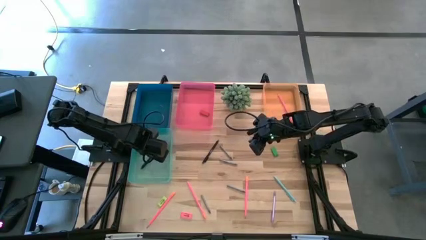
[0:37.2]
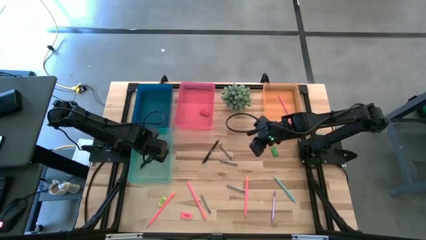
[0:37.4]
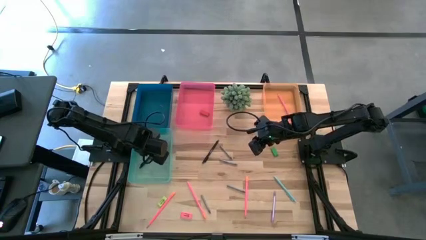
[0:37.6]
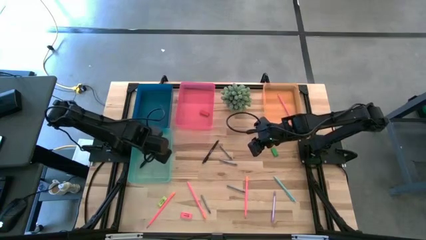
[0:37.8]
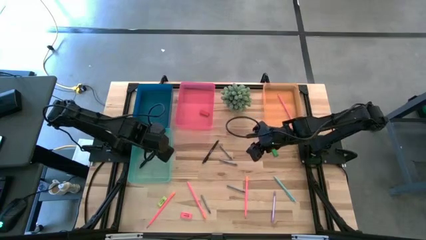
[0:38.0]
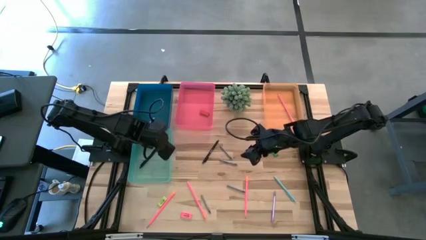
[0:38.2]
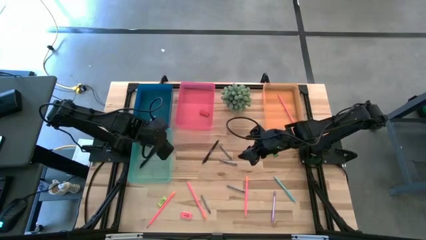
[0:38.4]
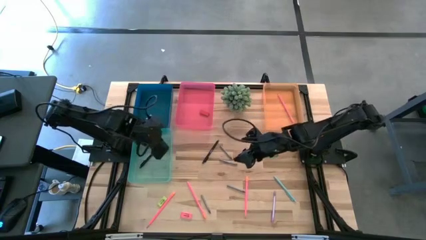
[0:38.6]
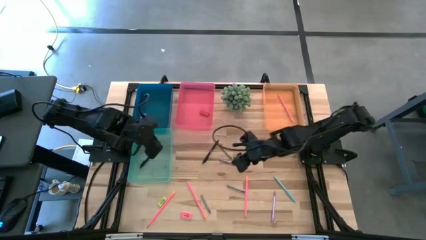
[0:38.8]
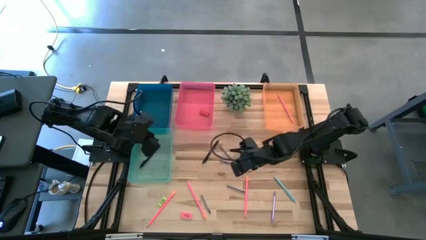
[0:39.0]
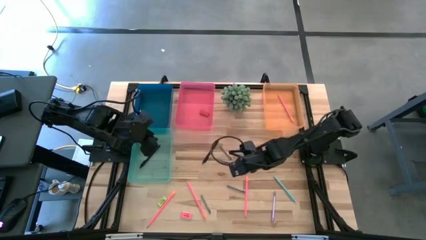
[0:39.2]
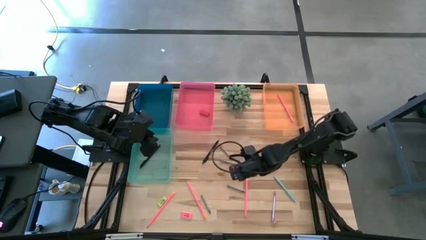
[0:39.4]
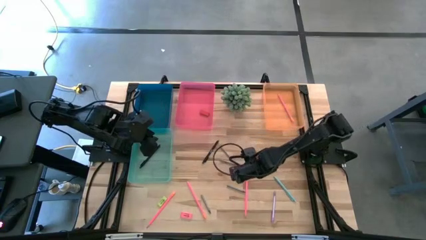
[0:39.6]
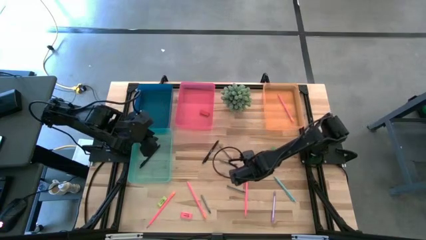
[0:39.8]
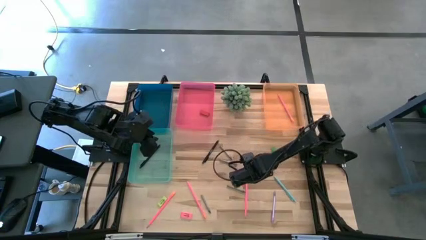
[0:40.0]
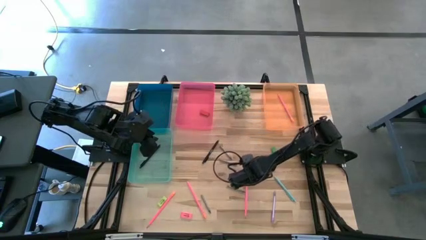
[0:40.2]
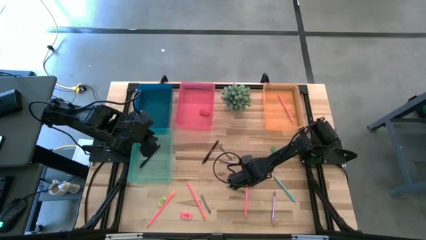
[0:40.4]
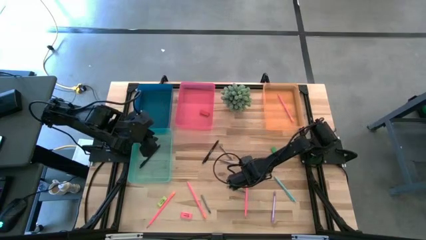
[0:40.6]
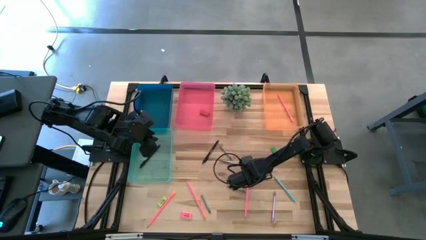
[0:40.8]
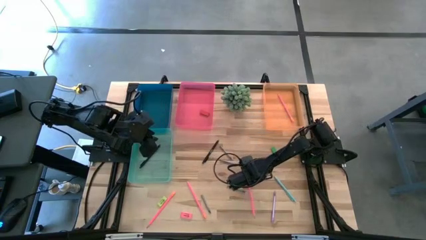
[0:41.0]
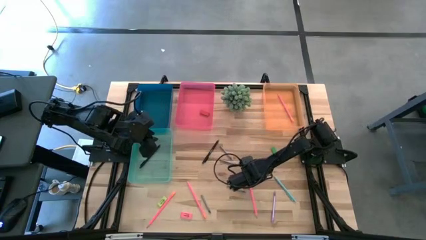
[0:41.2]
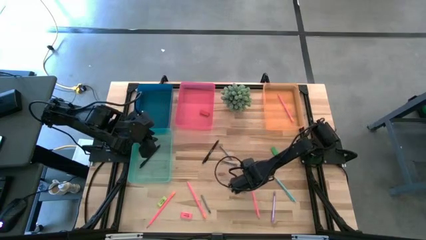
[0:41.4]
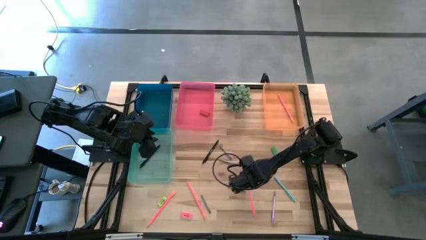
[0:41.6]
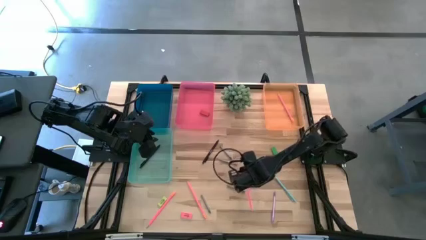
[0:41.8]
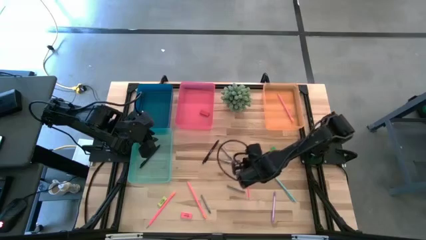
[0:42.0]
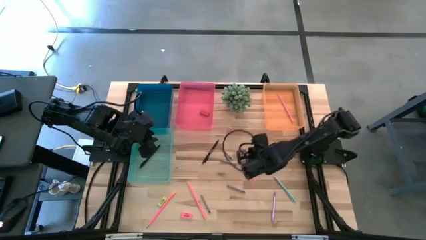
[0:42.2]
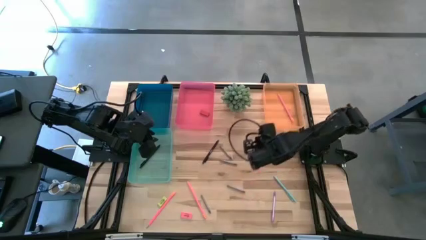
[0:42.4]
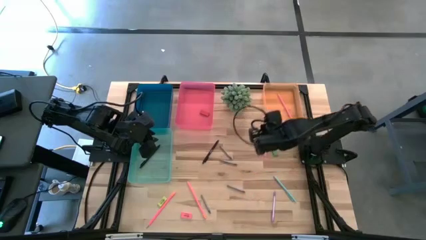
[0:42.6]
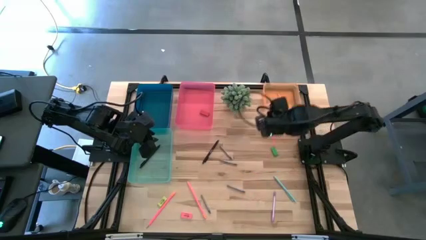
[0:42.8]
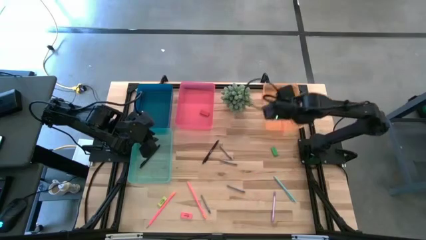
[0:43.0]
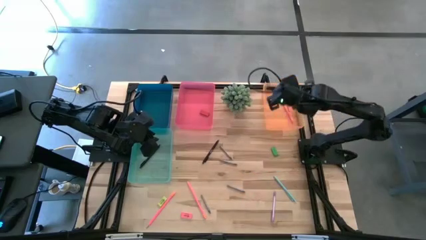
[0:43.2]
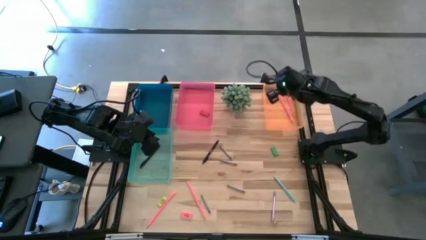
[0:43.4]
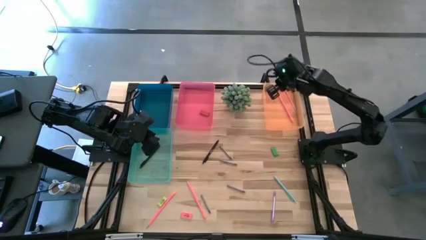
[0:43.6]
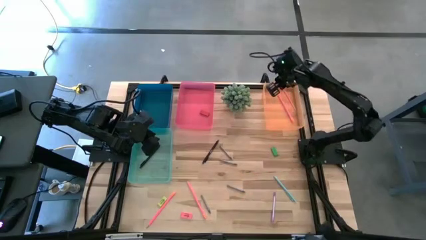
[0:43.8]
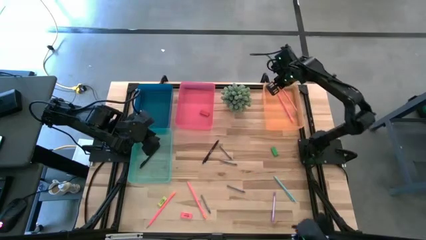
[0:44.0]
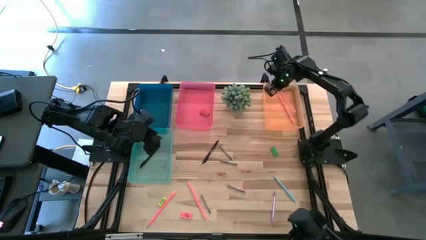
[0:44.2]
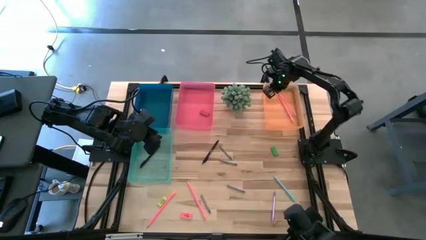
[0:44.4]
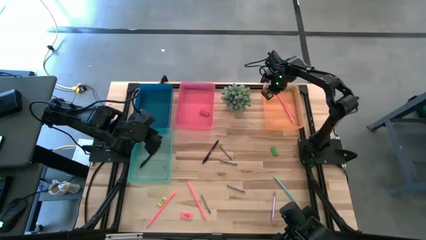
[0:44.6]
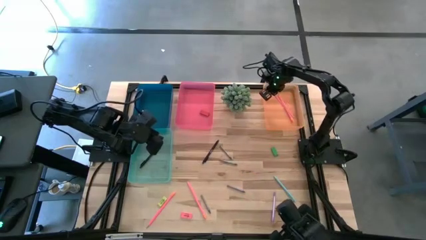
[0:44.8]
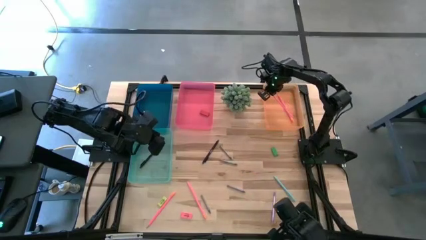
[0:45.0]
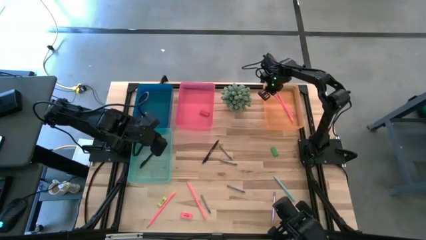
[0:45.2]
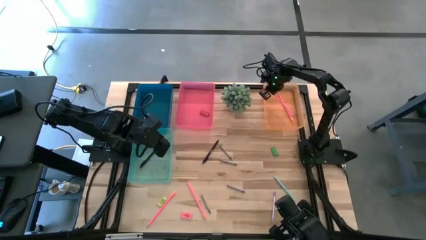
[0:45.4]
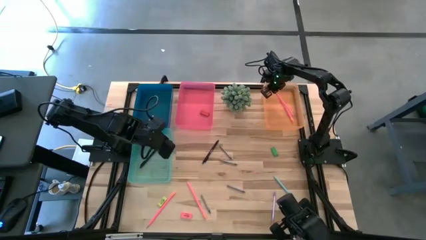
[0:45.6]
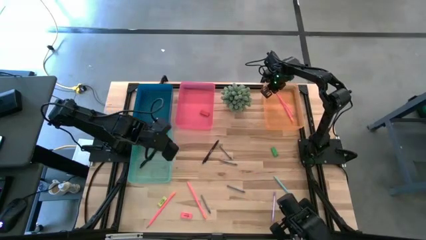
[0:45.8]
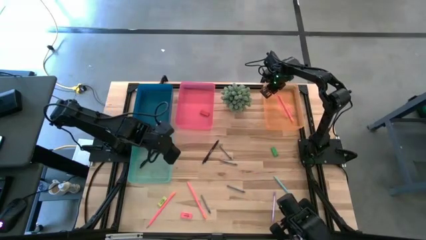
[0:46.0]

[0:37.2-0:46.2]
Task: Sort crayons/erasers/pens/pencils in bins
Put the pink pencil into the orange bin

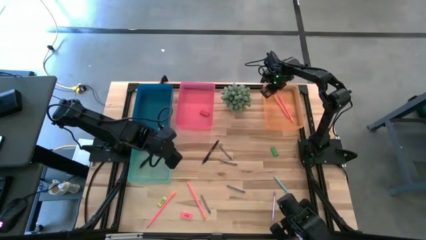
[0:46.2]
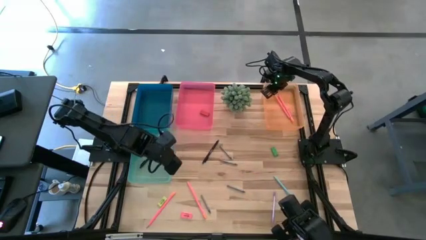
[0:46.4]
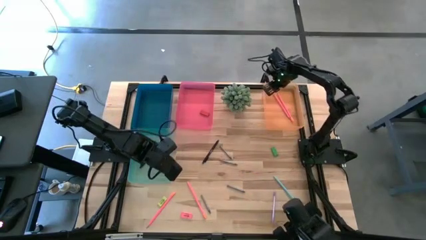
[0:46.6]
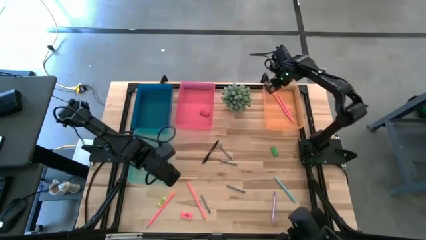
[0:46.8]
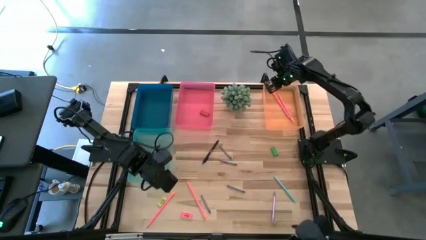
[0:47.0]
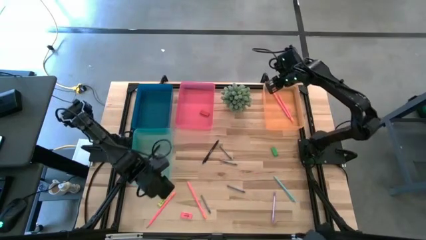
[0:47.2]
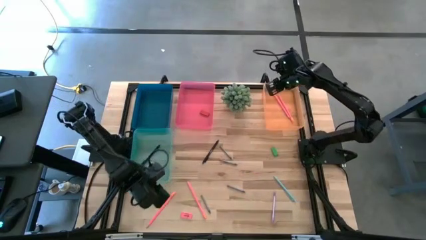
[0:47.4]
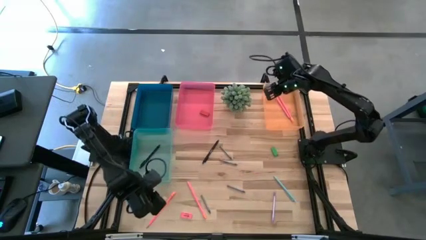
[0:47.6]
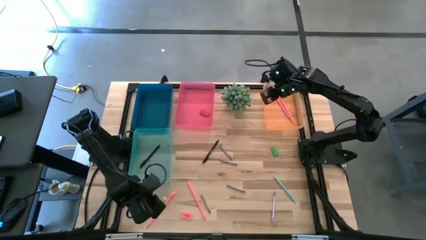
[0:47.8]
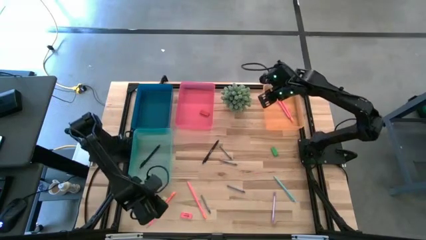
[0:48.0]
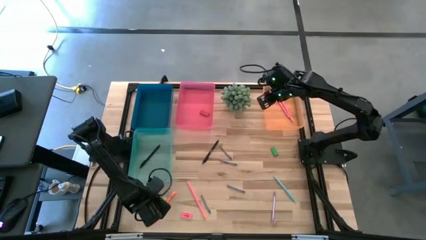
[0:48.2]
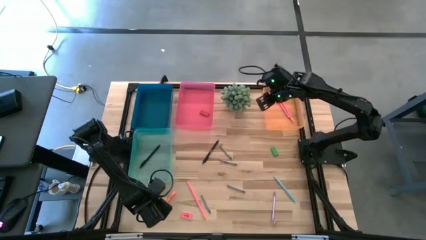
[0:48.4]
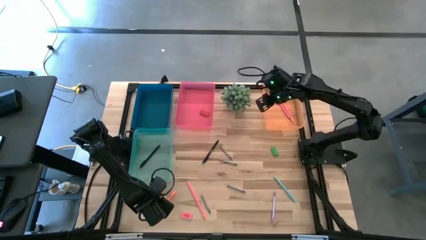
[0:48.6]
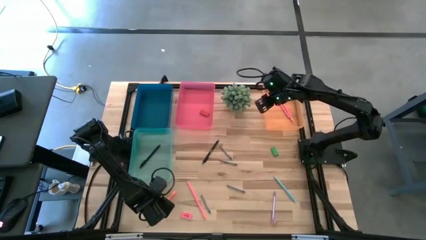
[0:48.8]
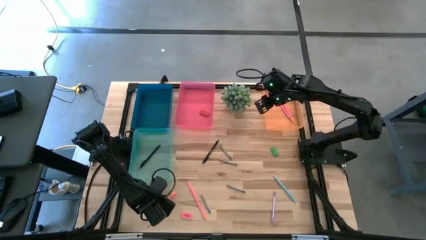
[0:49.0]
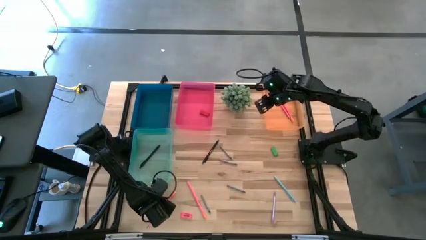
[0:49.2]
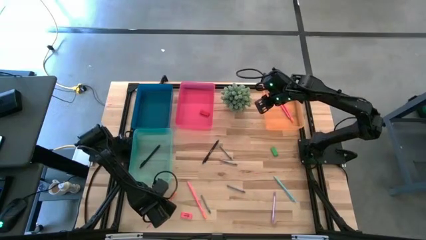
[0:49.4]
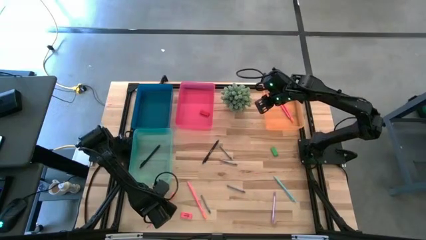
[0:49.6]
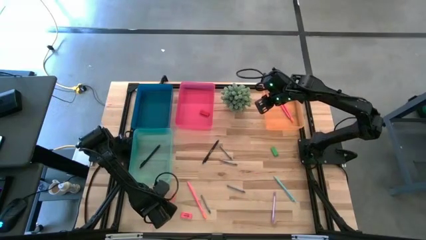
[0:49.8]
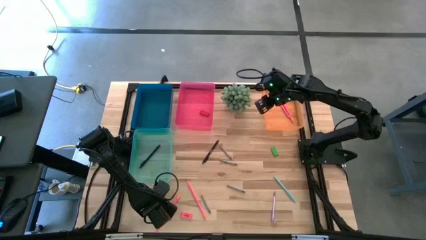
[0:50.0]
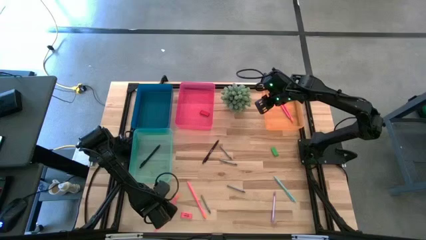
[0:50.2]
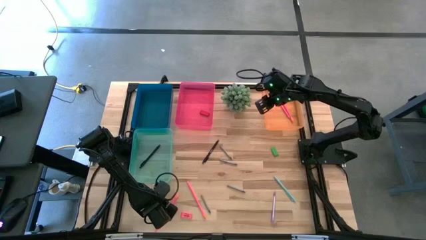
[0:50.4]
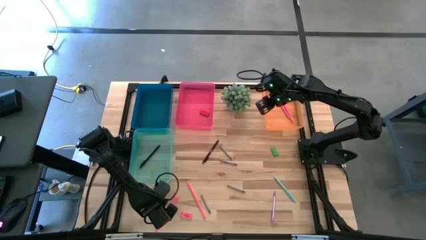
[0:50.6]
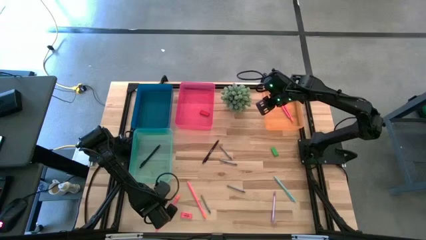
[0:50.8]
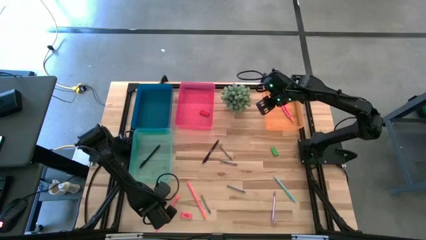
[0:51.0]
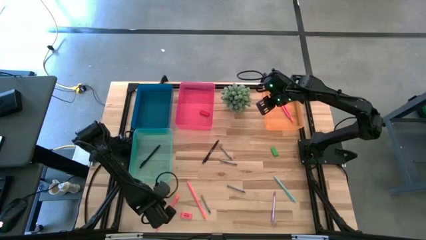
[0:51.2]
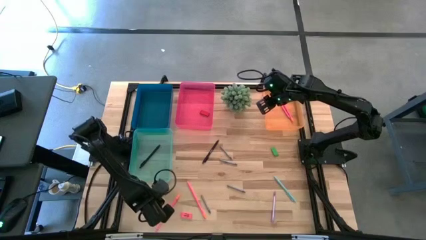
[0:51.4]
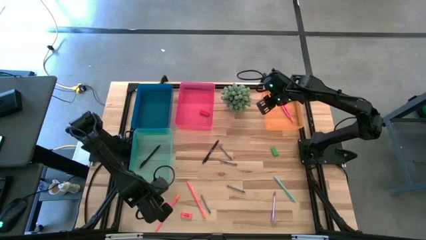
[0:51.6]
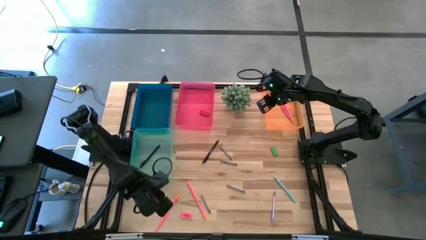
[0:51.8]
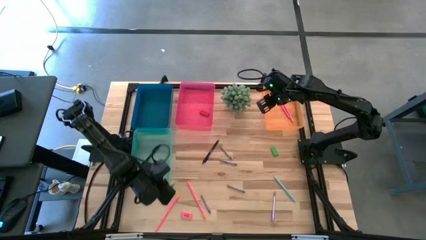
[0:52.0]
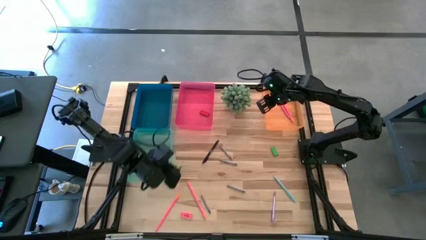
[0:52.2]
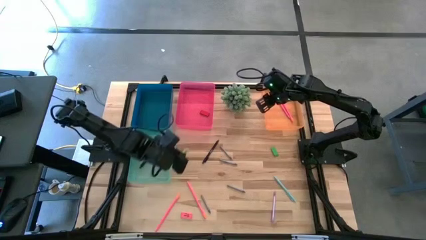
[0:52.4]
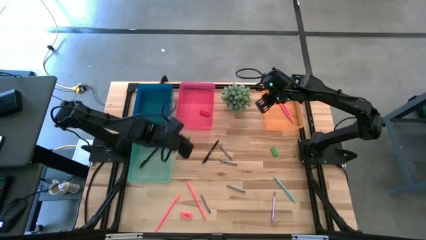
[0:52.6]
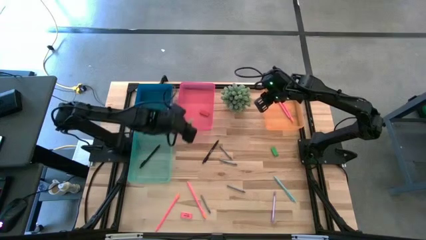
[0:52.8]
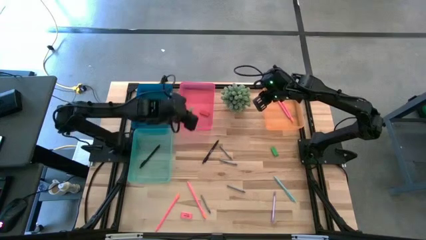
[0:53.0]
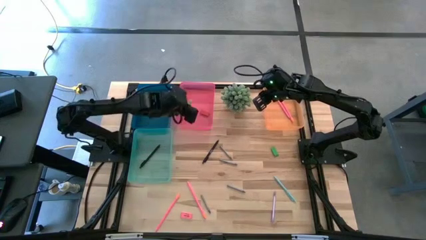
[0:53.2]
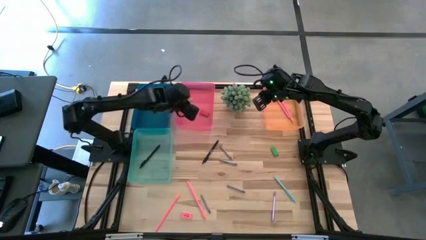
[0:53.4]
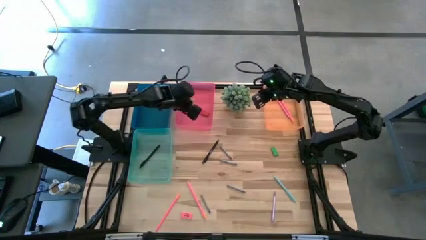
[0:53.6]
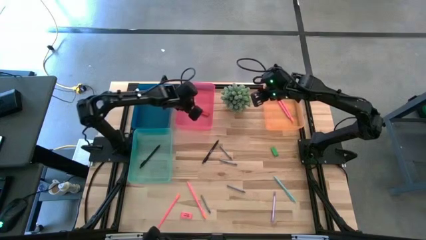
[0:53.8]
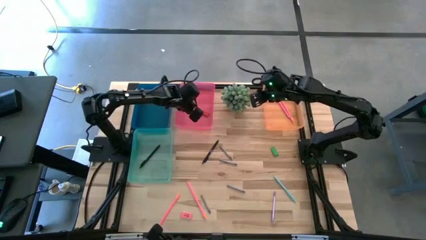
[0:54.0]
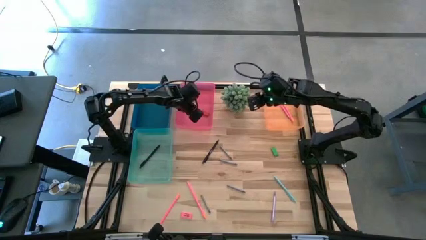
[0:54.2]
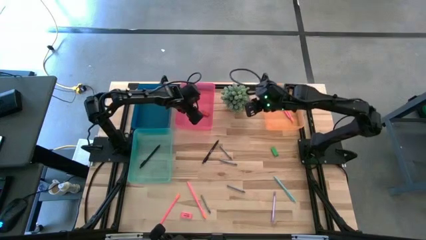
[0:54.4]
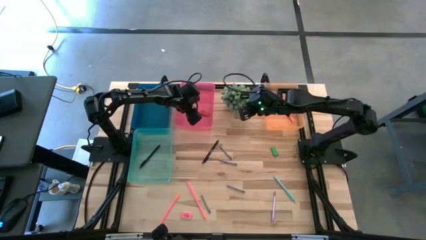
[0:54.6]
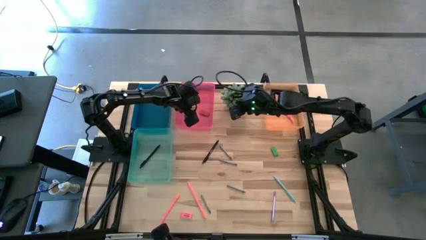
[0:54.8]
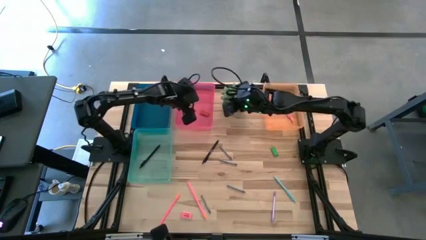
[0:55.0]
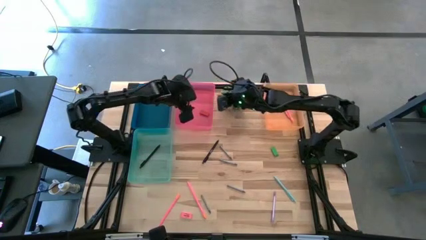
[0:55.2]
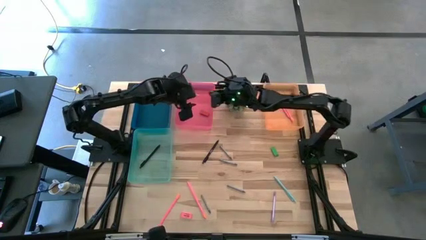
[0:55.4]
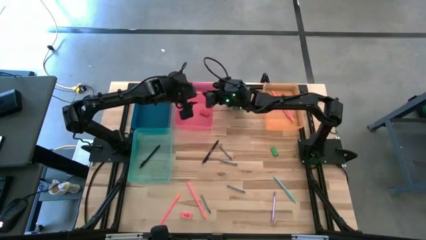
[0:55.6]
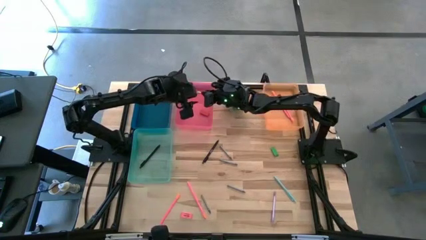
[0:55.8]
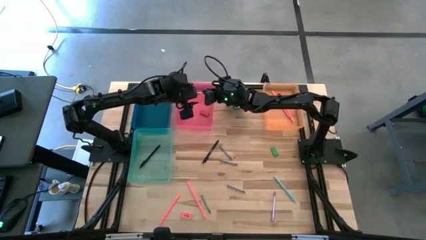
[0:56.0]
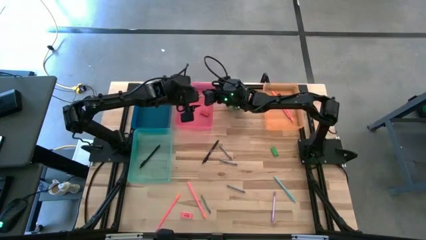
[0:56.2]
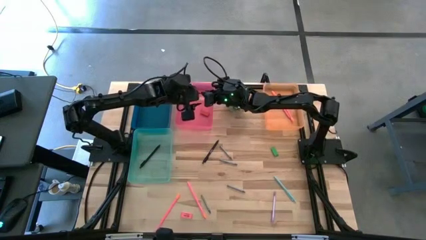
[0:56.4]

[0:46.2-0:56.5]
Put the yellow eraser into the pink bin
